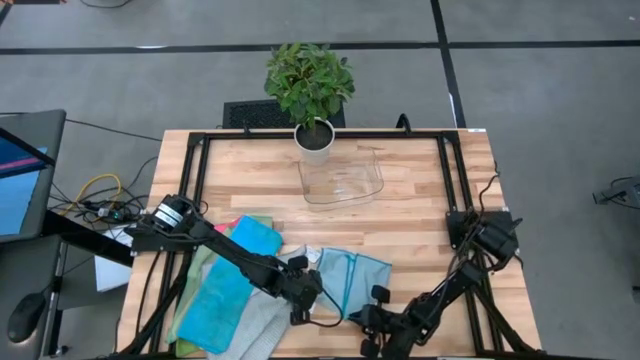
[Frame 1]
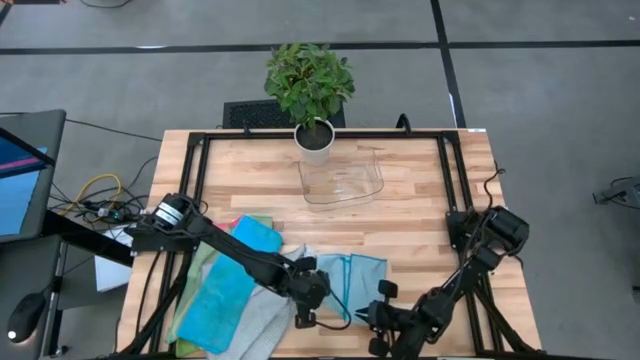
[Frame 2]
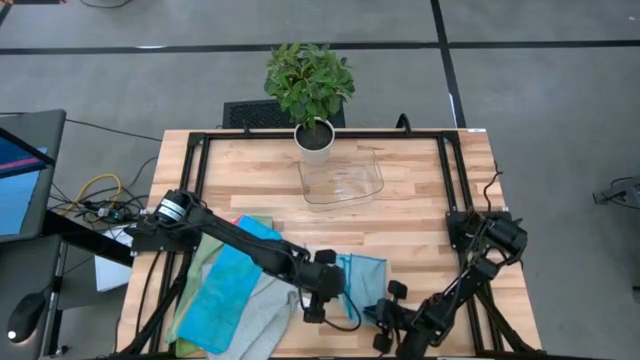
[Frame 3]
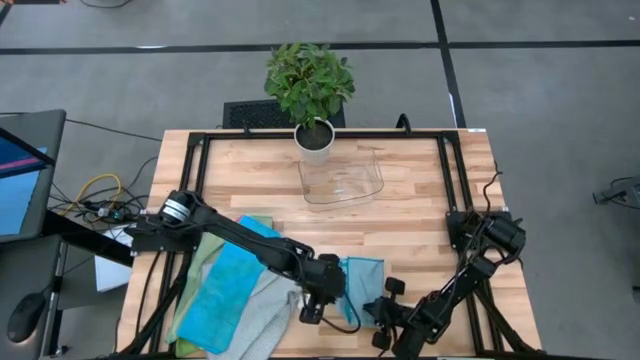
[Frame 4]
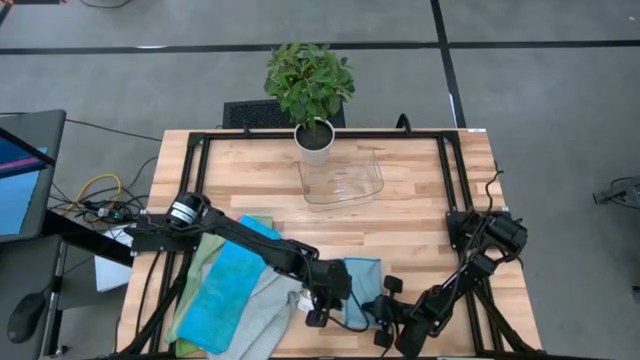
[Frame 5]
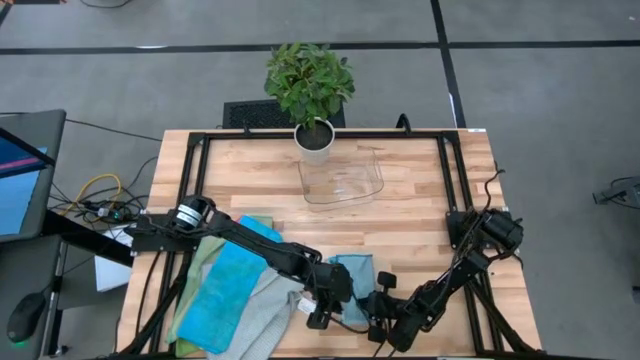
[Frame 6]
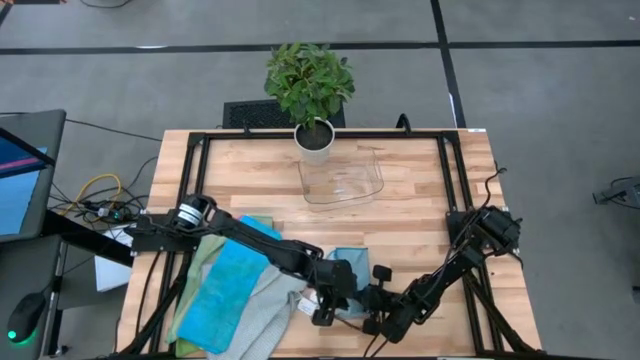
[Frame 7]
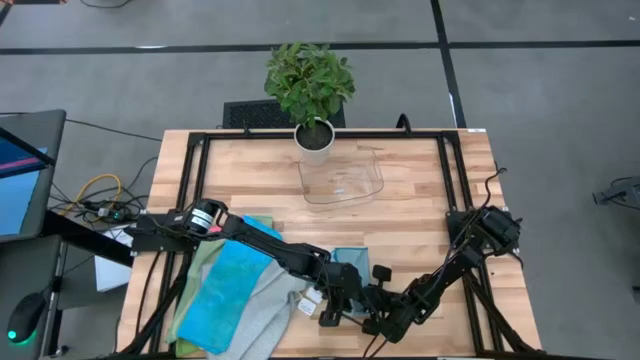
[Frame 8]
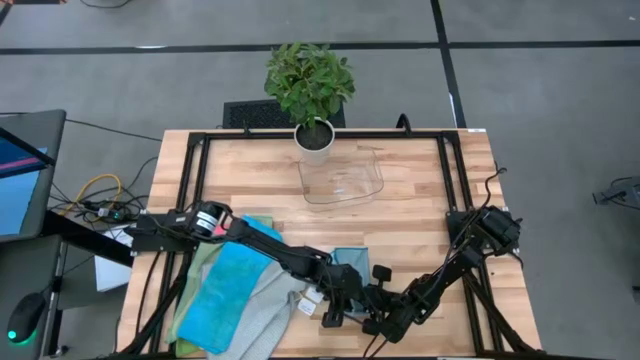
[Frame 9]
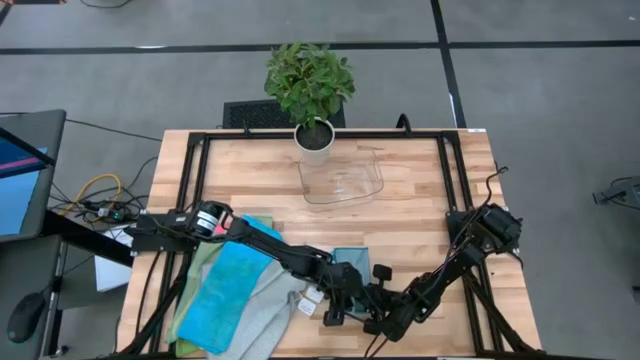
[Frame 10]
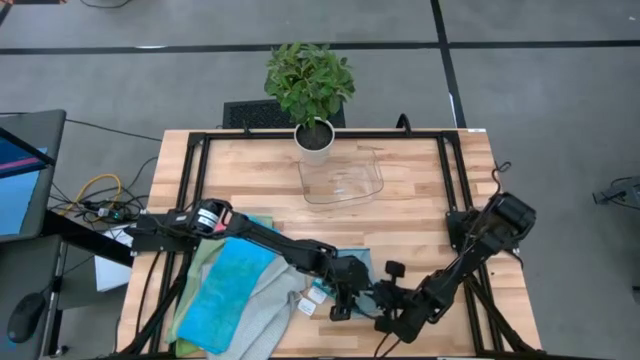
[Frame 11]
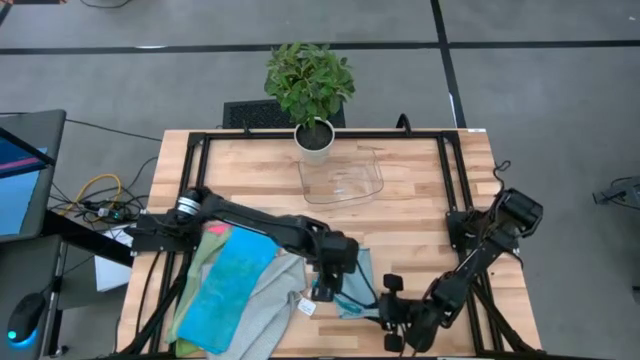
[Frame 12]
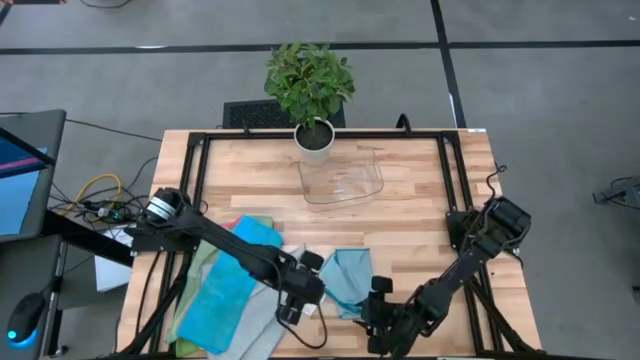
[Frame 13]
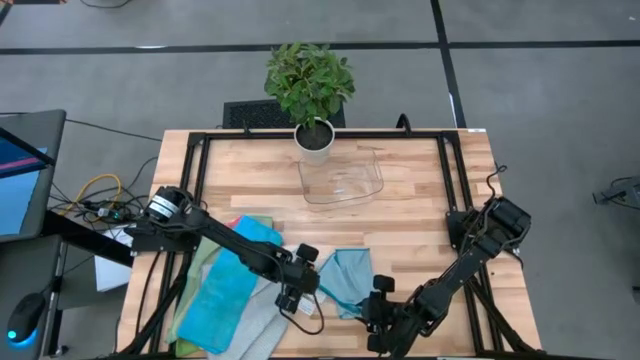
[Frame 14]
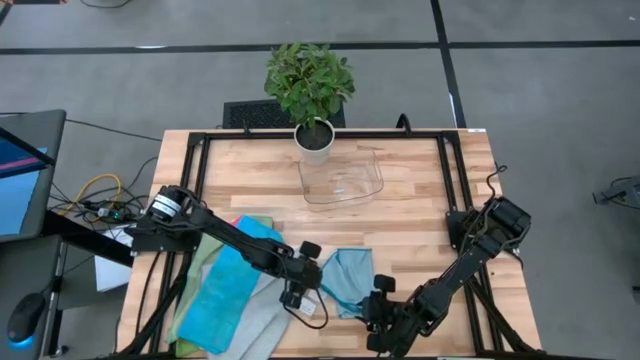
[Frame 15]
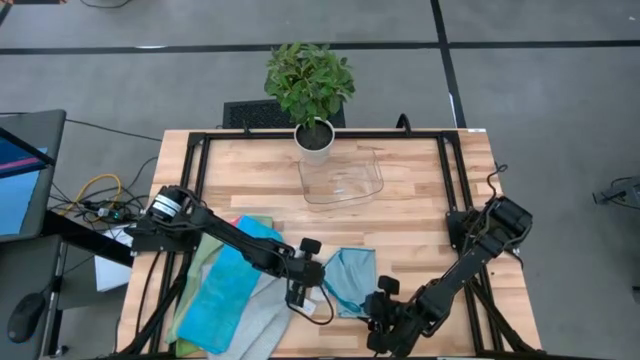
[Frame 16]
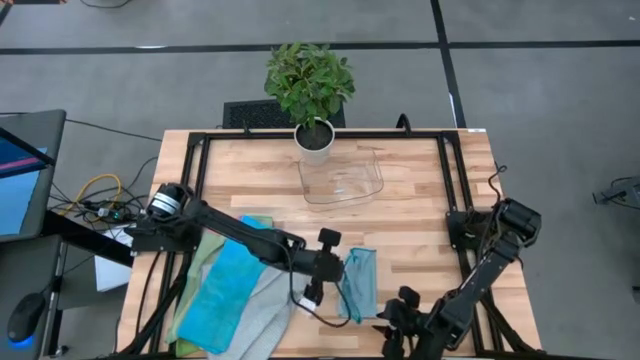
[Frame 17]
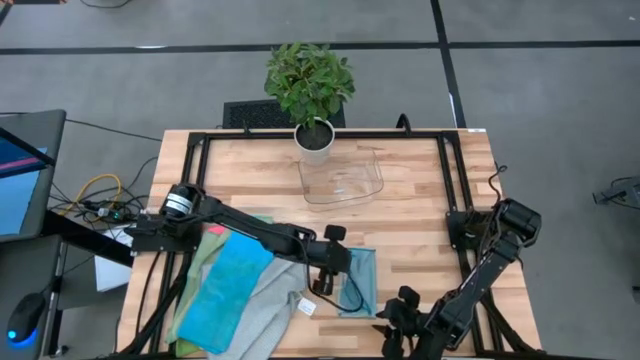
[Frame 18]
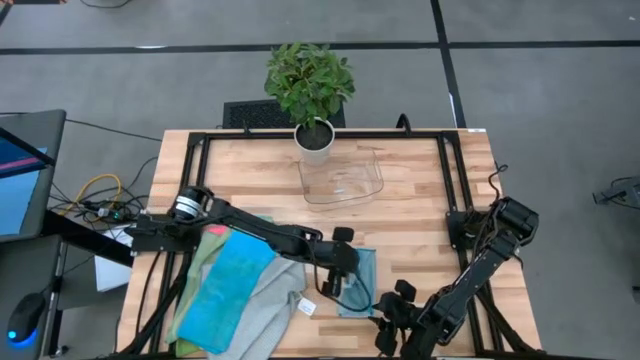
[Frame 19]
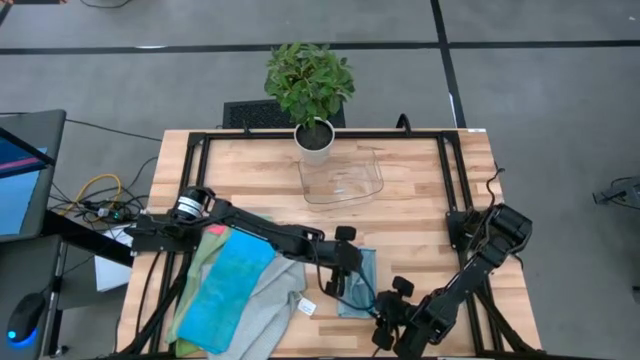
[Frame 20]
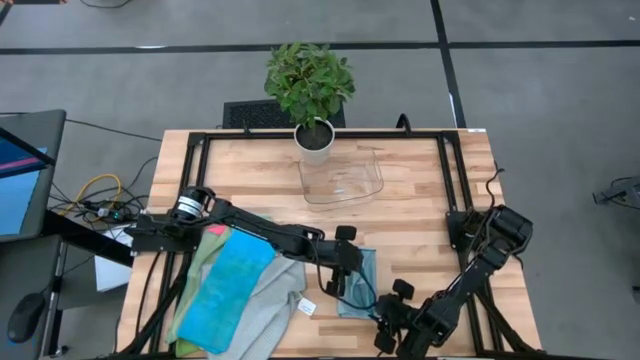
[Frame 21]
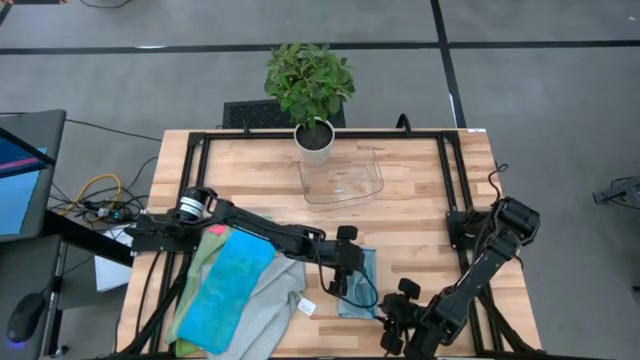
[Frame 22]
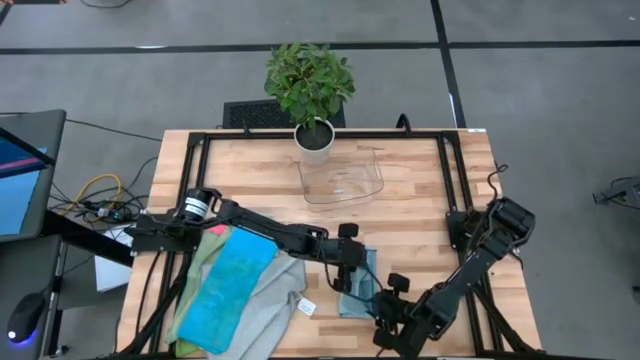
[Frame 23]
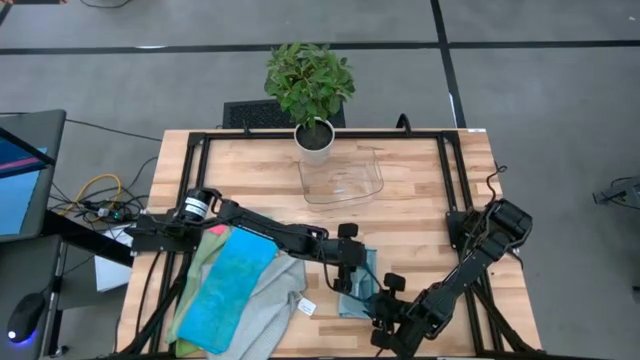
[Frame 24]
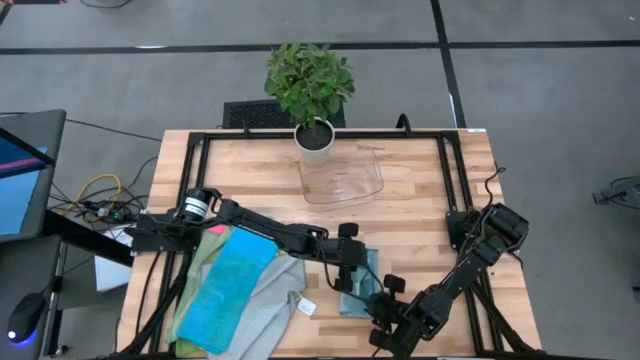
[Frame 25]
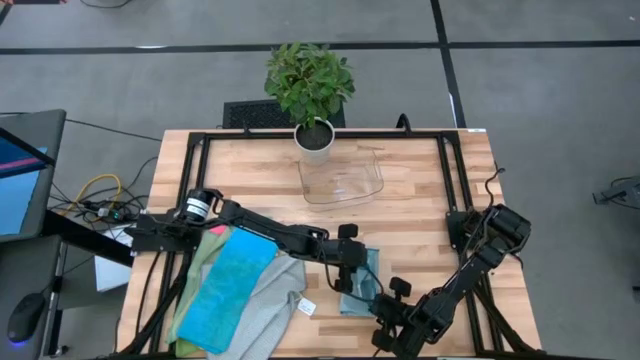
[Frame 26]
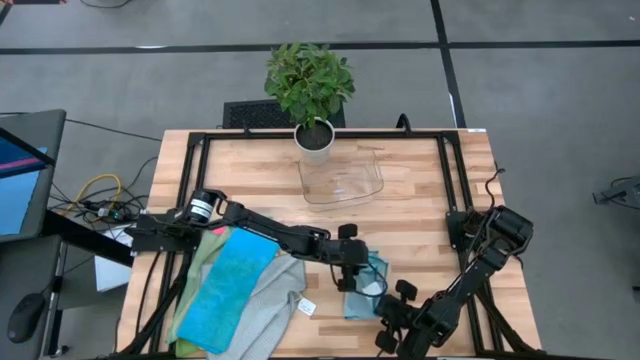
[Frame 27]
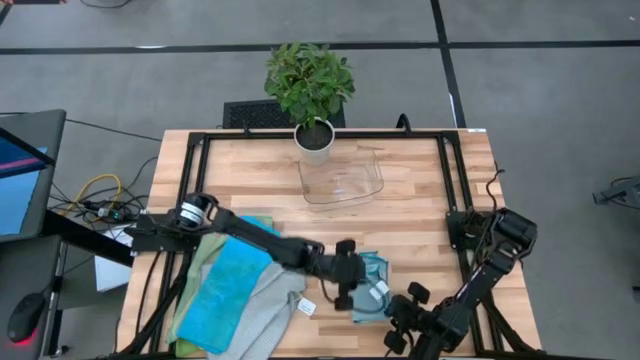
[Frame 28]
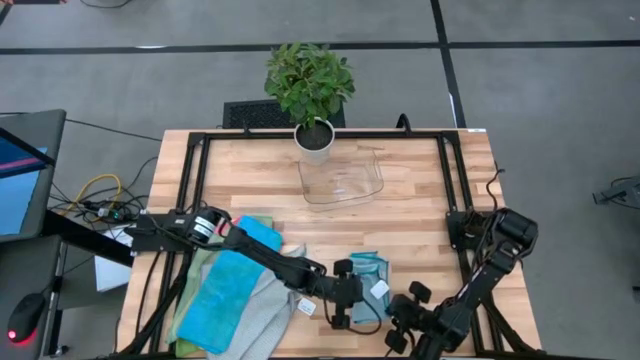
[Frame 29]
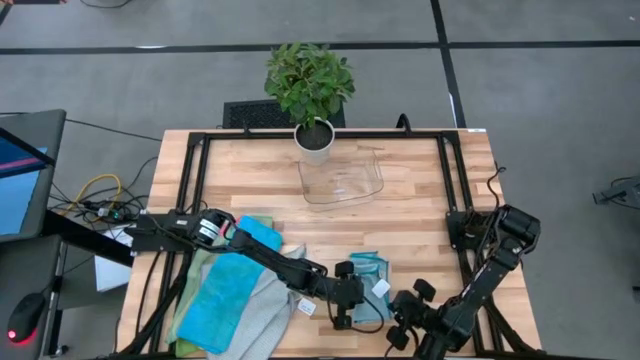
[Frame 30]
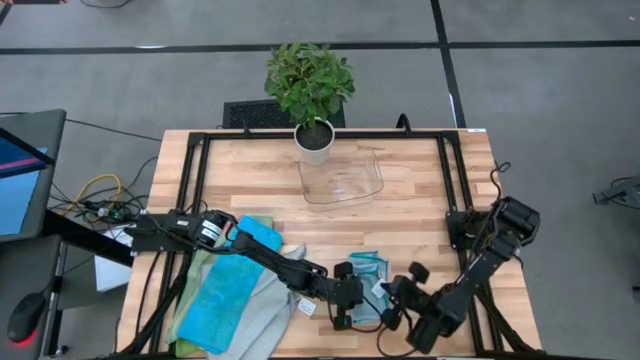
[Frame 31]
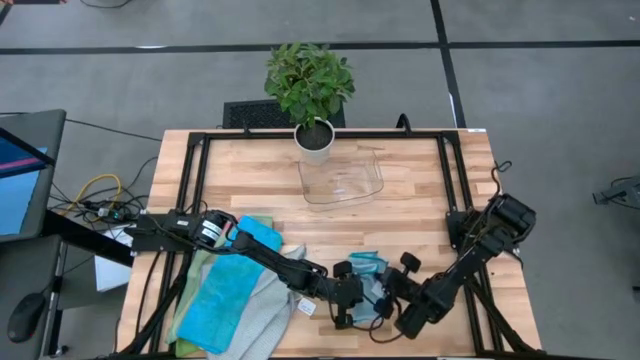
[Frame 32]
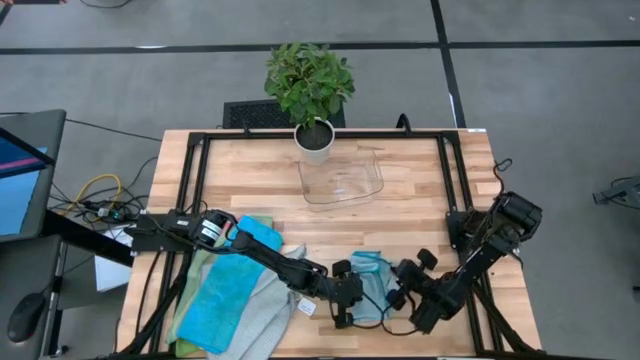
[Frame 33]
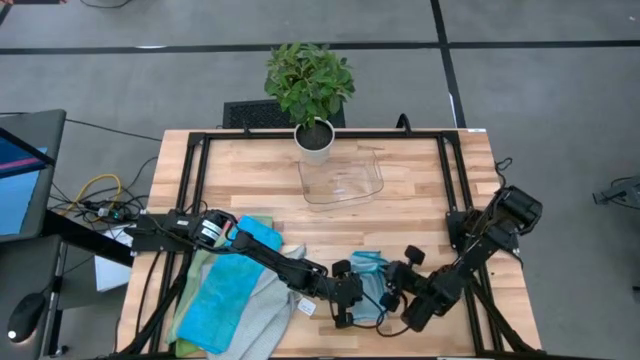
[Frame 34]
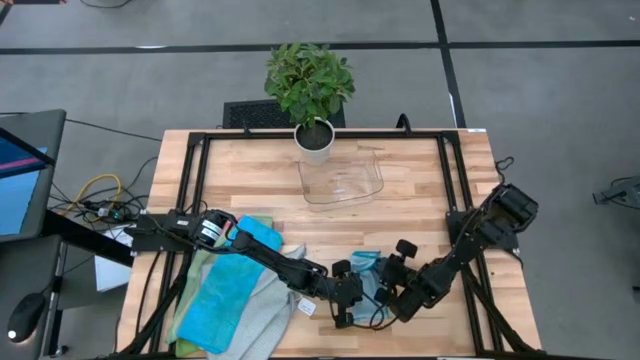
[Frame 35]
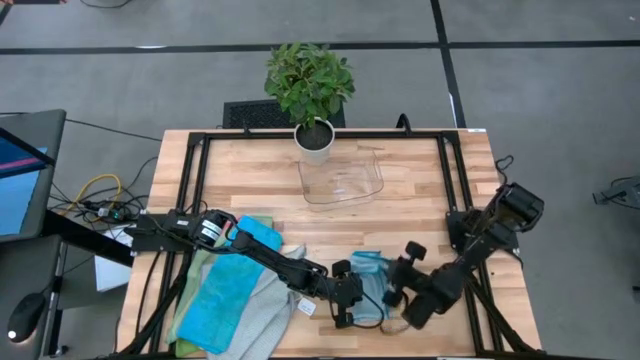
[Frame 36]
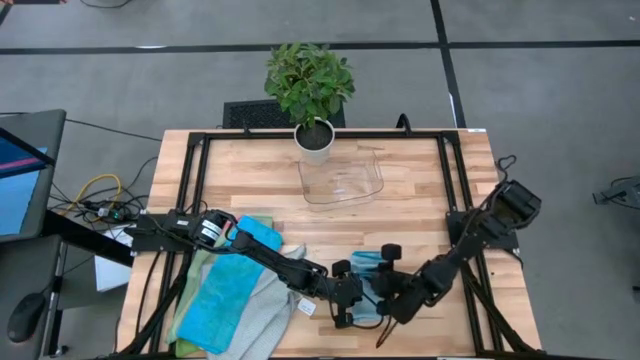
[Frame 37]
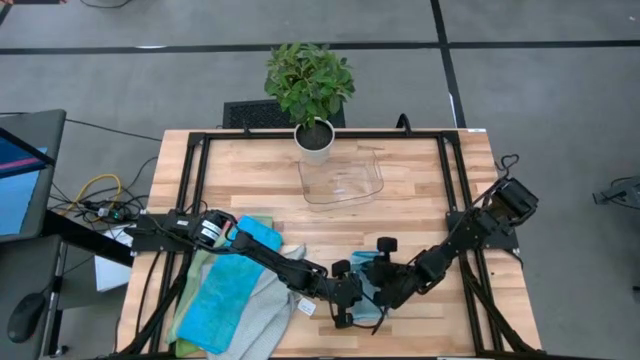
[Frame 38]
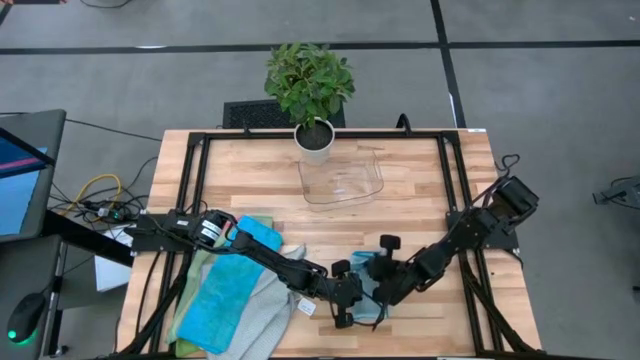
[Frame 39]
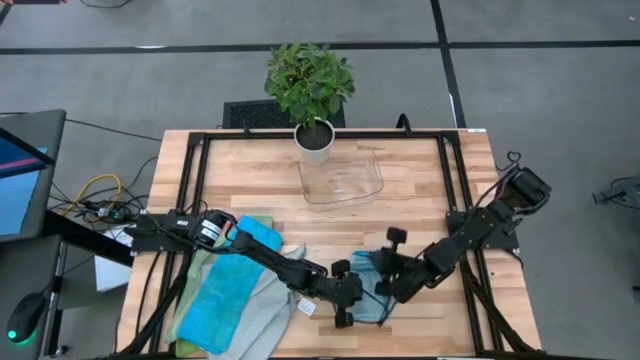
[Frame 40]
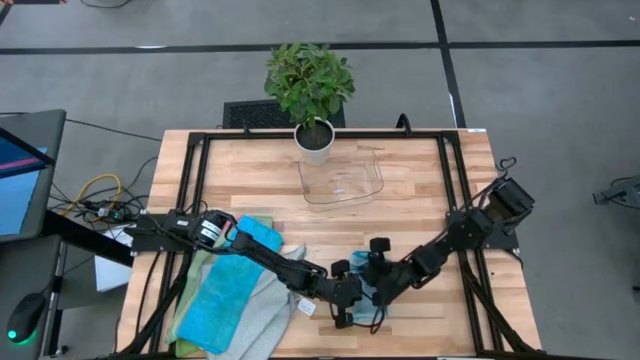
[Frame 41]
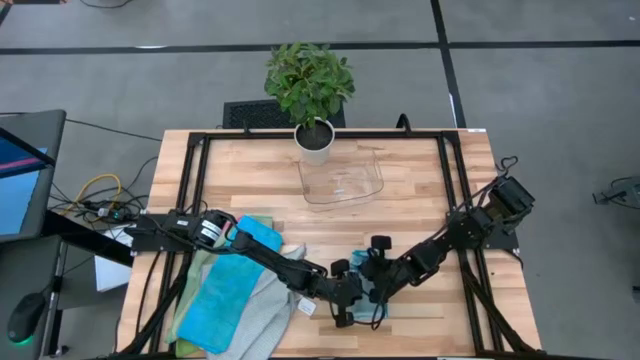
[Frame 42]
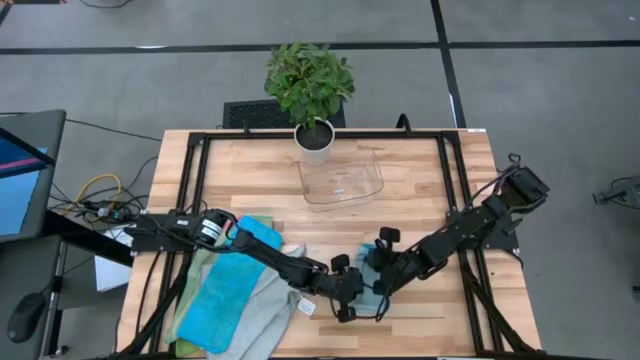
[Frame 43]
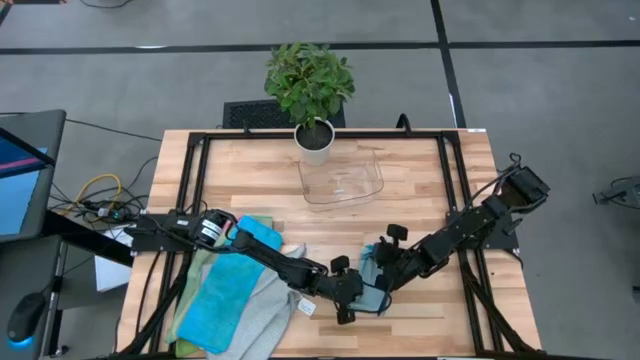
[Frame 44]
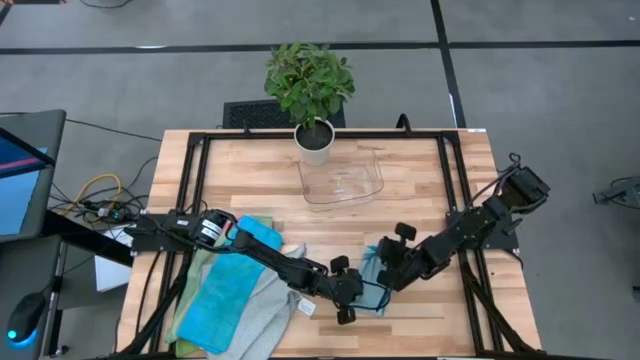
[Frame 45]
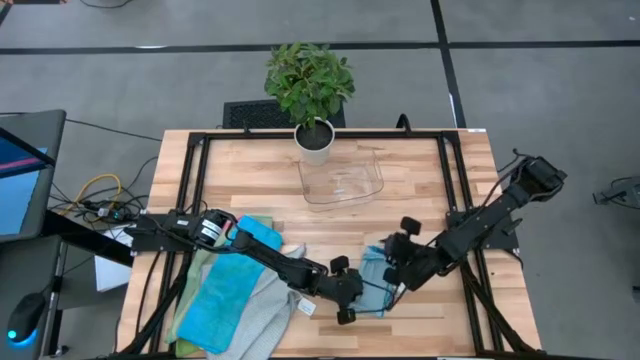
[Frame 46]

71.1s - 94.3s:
Task: Fold microfiber towels
Fold the light blue microfiber cloth
